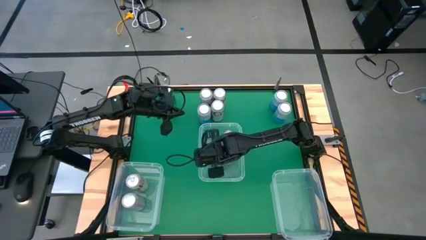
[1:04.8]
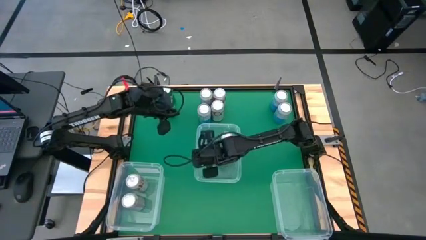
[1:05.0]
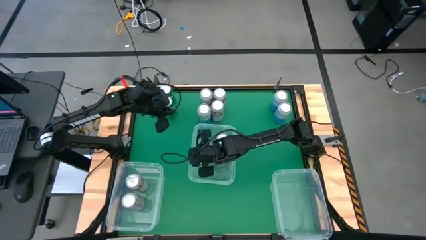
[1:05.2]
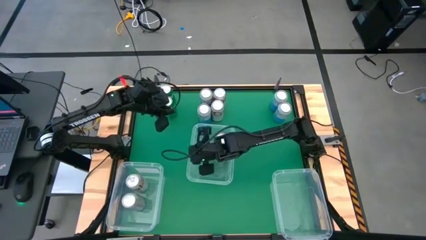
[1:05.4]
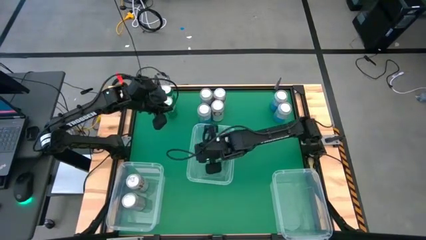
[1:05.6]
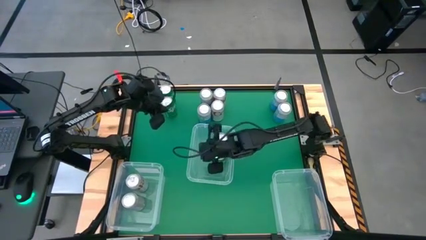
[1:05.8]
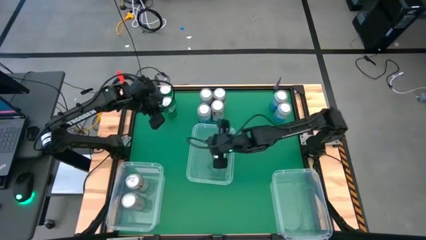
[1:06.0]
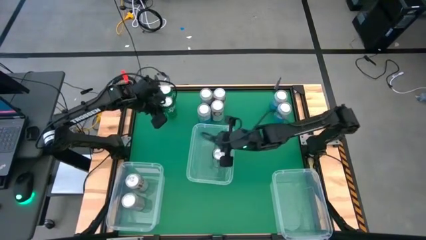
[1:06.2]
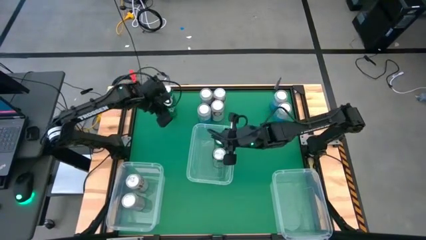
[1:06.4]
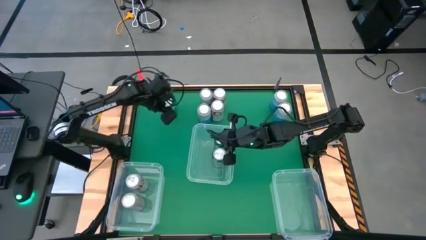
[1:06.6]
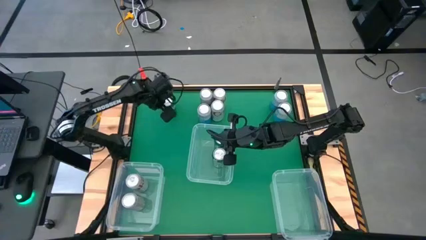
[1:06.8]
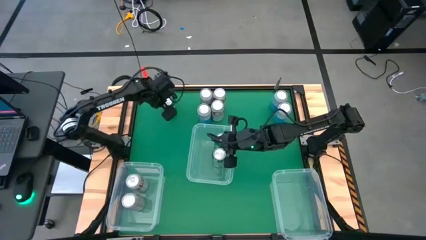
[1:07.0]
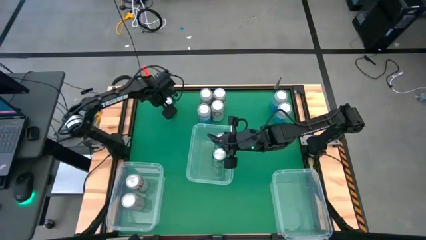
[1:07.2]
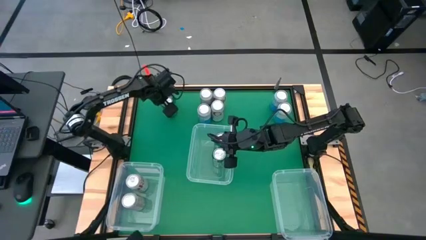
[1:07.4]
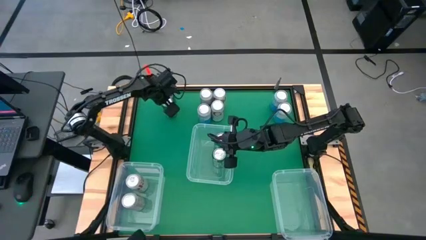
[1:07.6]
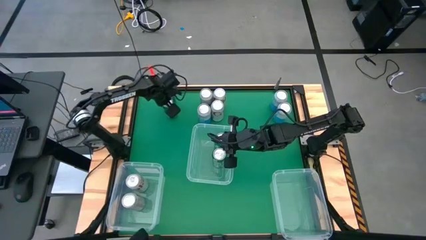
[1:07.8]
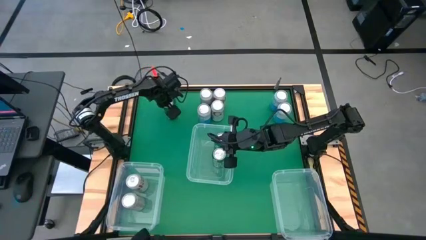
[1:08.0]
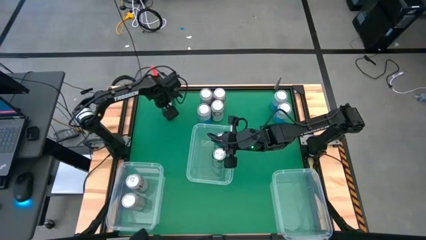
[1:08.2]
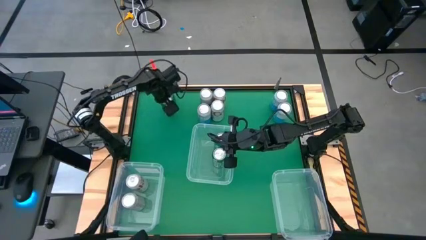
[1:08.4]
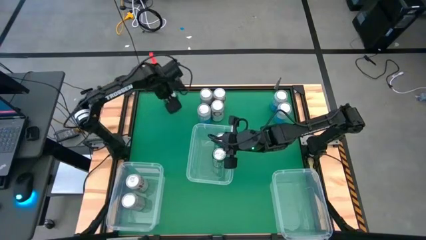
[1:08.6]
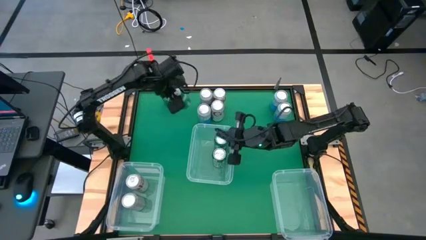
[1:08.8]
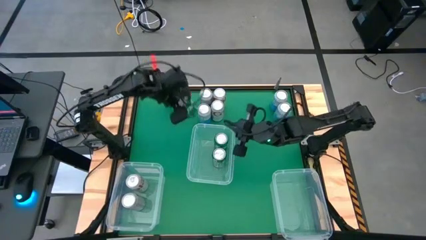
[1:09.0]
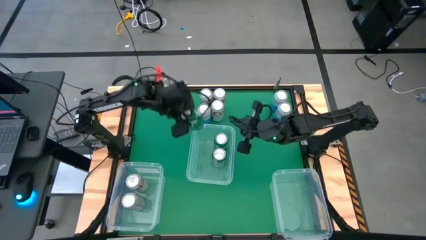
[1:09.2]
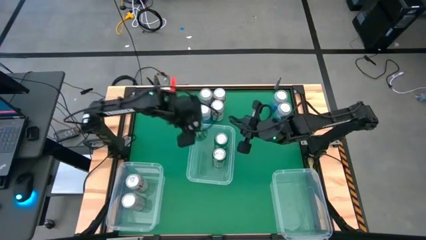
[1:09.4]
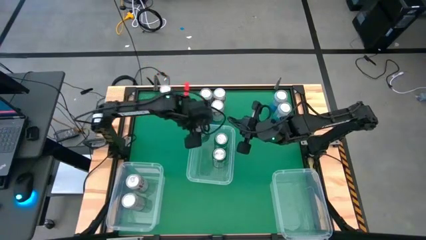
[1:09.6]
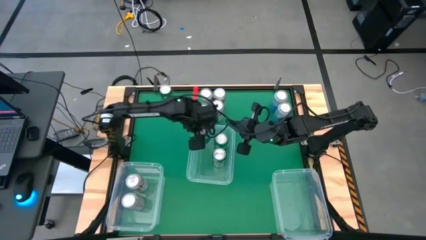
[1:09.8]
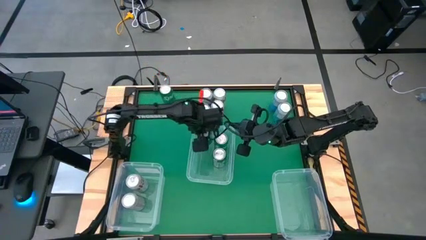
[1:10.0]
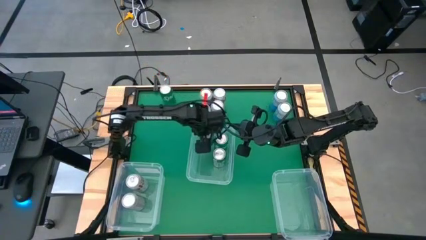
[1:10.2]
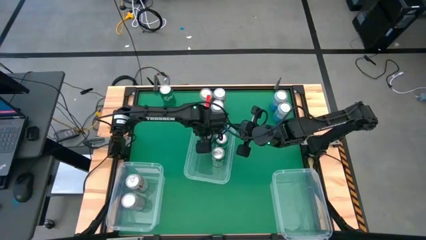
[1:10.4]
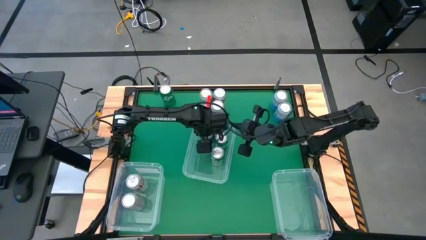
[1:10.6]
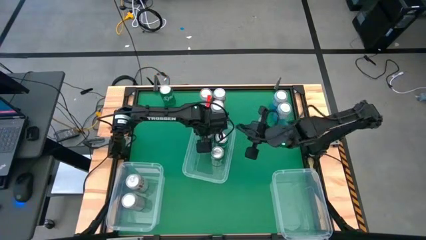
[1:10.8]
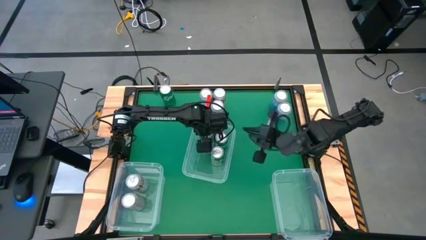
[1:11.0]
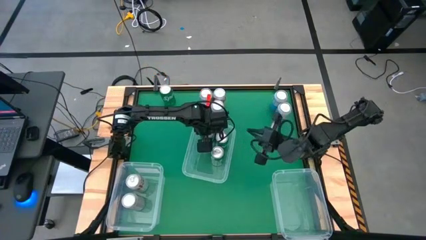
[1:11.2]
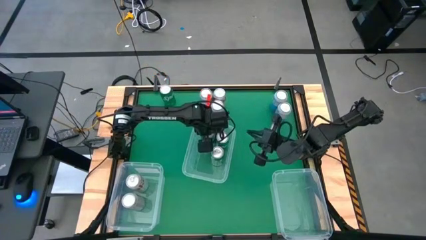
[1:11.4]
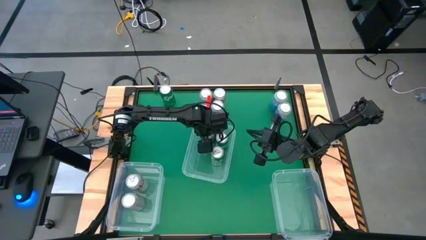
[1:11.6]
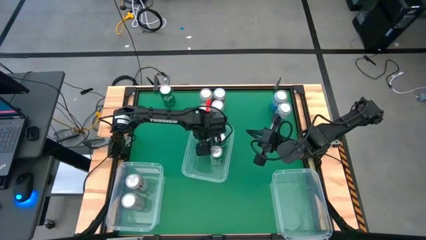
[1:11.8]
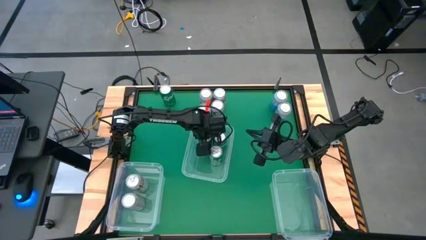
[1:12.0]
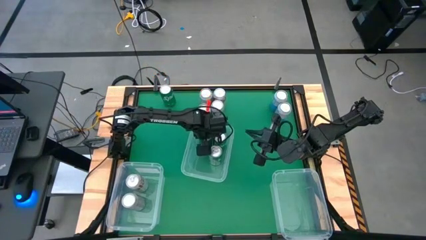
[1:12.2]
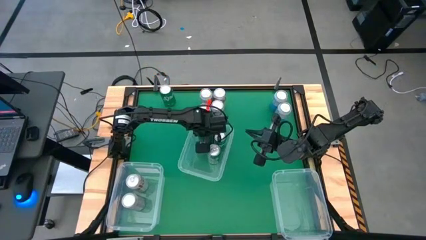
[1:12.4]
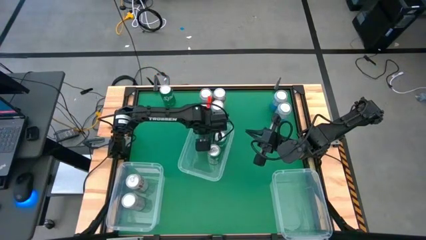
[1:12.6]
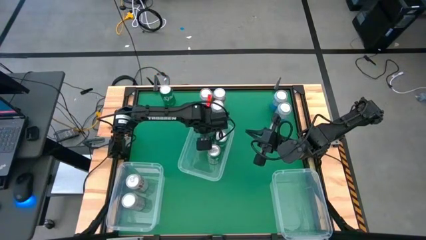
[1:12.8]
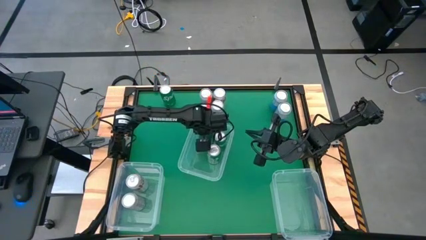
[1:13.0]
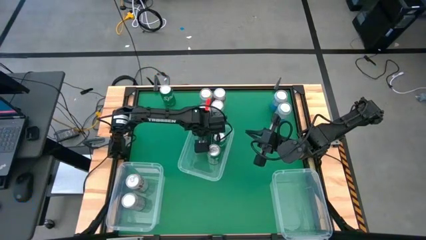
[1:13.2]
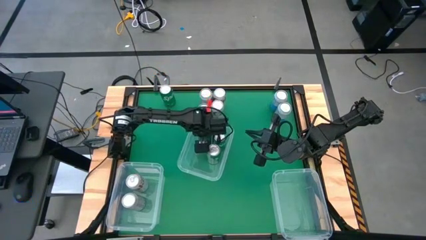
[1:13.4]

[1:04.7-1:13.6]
Task: Sort soda cans
Put the green soda can into the top transparent bin

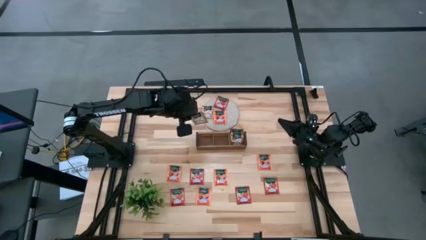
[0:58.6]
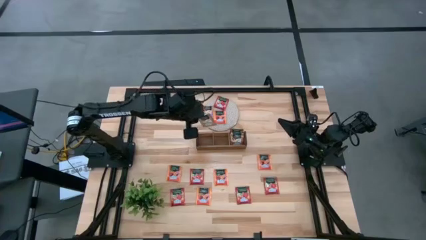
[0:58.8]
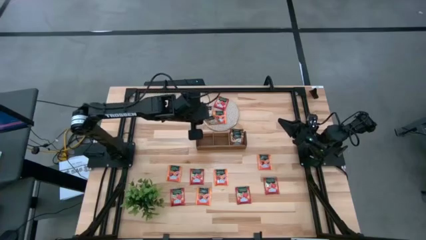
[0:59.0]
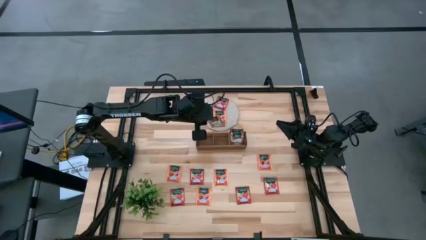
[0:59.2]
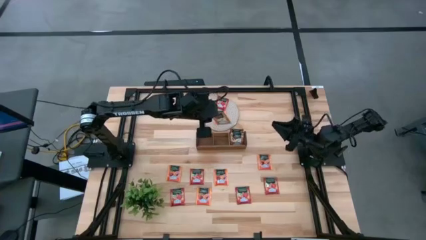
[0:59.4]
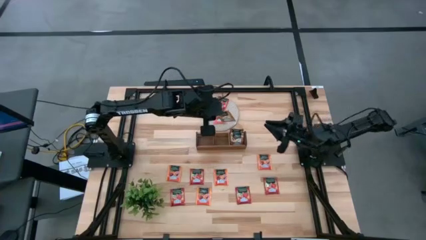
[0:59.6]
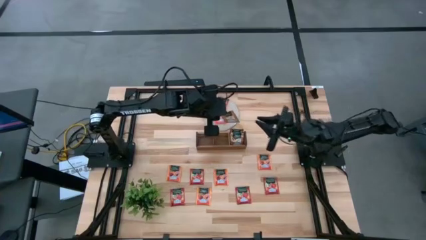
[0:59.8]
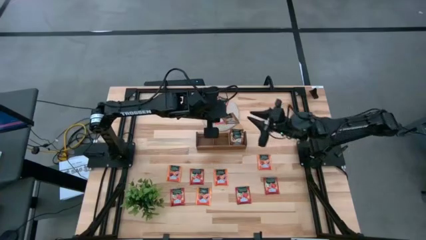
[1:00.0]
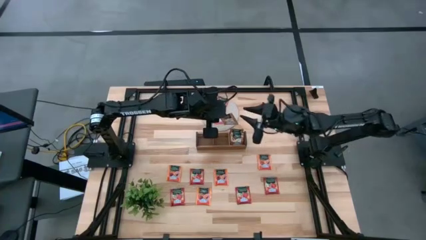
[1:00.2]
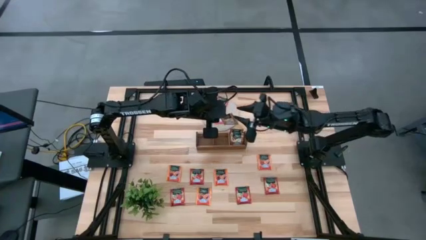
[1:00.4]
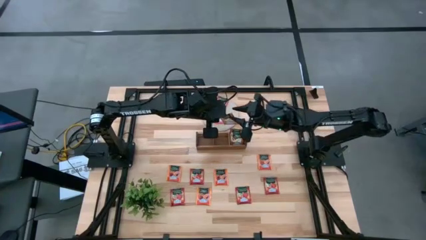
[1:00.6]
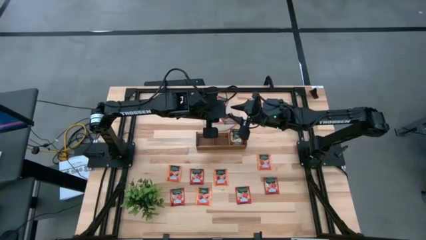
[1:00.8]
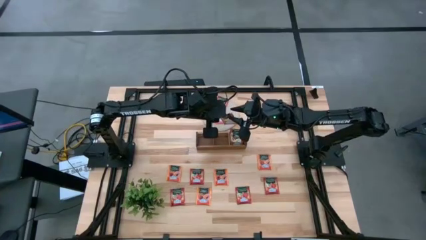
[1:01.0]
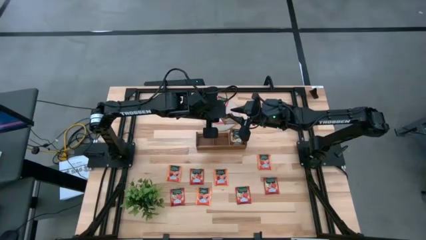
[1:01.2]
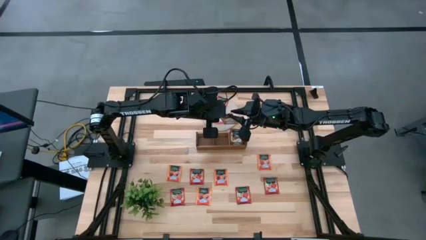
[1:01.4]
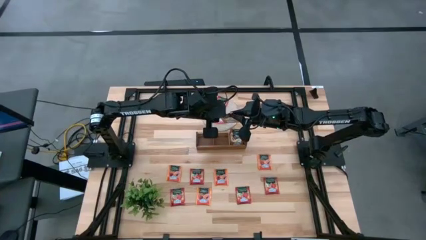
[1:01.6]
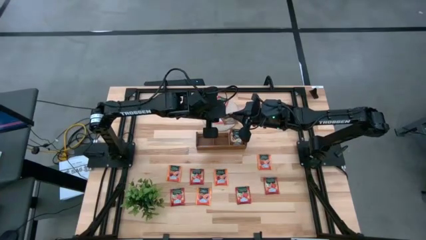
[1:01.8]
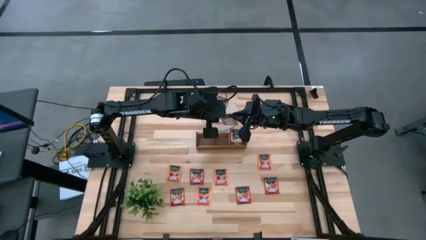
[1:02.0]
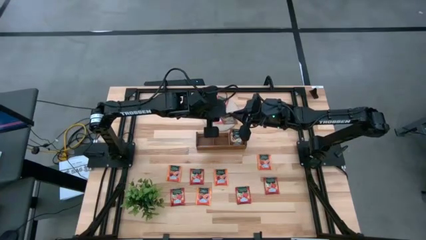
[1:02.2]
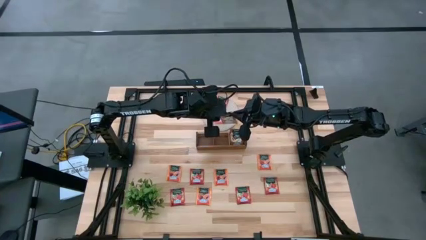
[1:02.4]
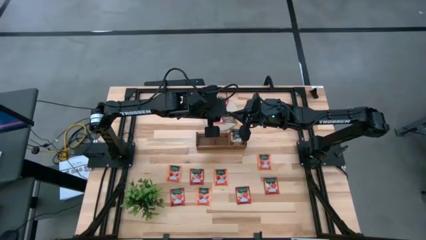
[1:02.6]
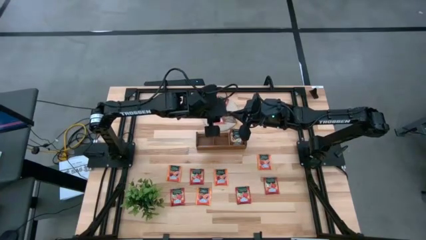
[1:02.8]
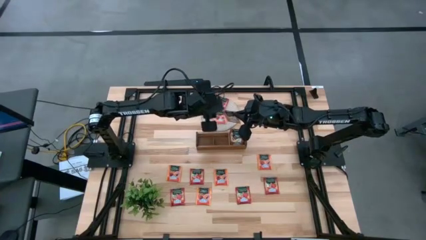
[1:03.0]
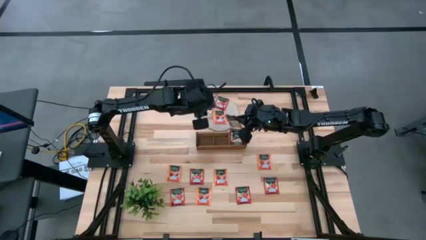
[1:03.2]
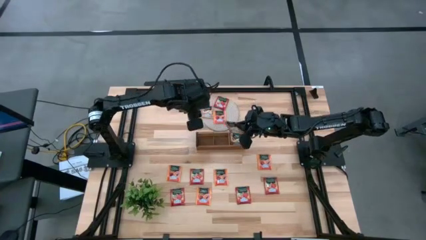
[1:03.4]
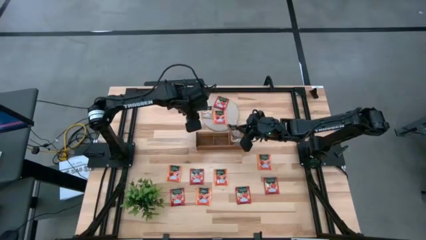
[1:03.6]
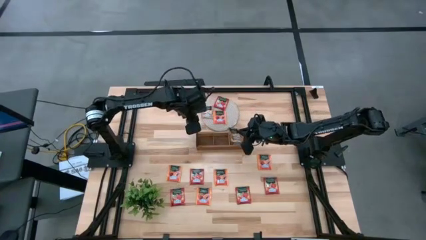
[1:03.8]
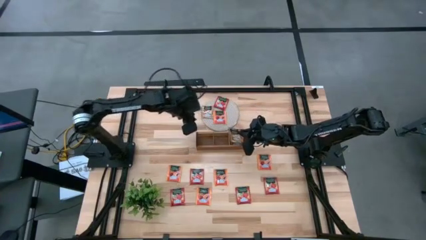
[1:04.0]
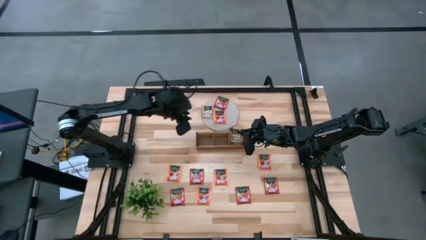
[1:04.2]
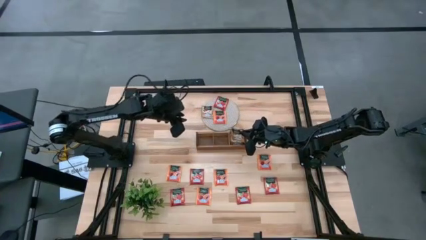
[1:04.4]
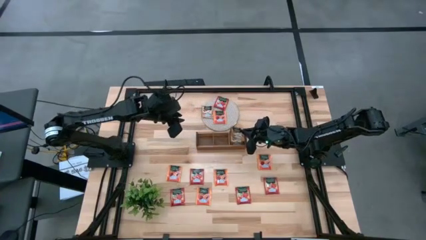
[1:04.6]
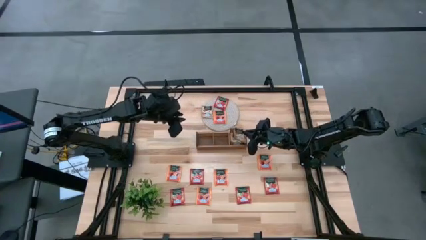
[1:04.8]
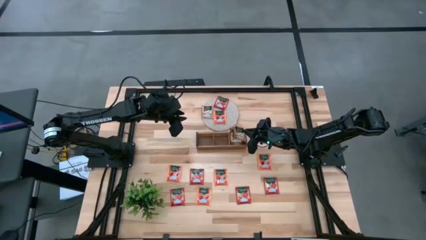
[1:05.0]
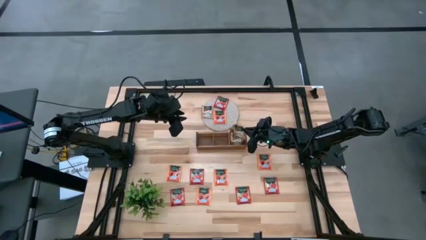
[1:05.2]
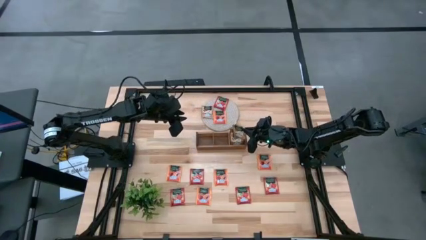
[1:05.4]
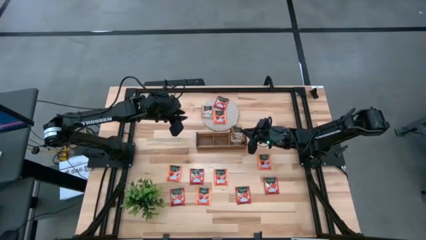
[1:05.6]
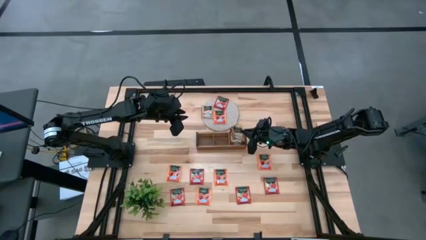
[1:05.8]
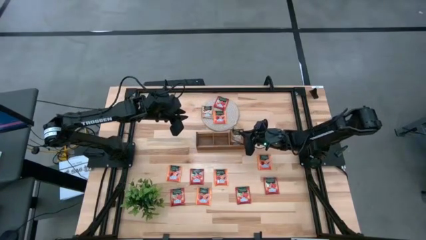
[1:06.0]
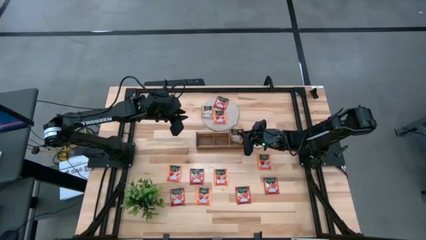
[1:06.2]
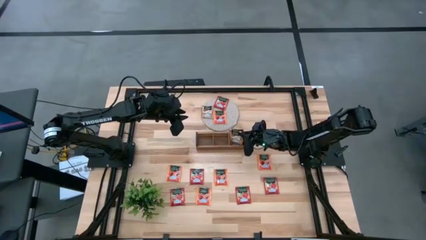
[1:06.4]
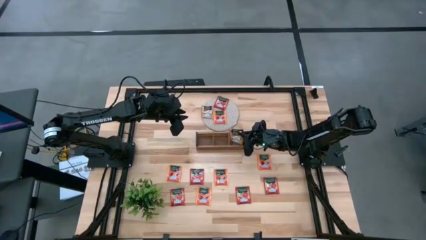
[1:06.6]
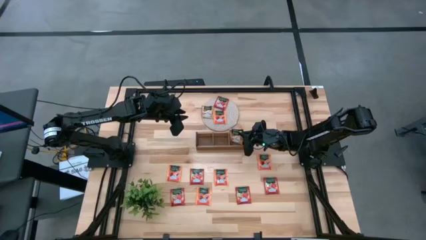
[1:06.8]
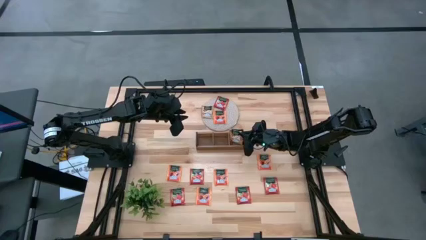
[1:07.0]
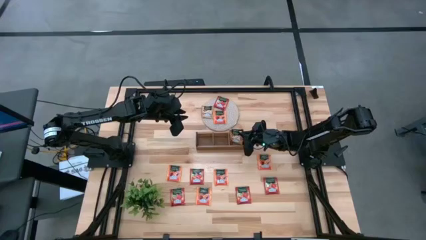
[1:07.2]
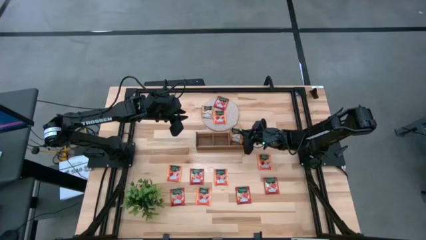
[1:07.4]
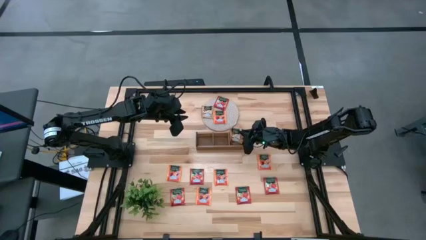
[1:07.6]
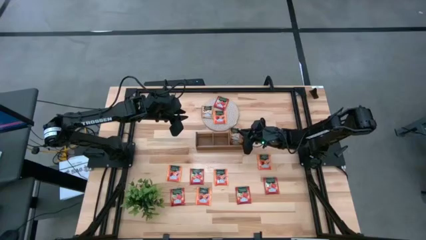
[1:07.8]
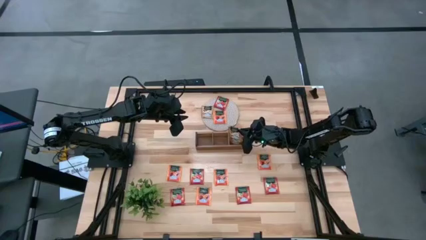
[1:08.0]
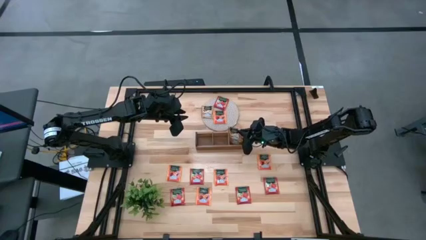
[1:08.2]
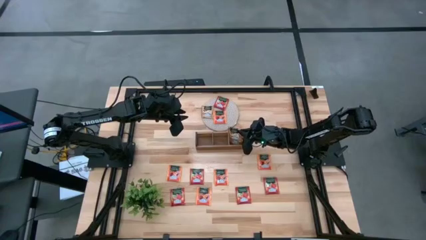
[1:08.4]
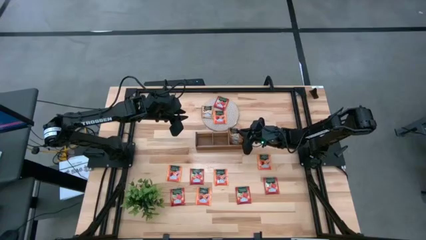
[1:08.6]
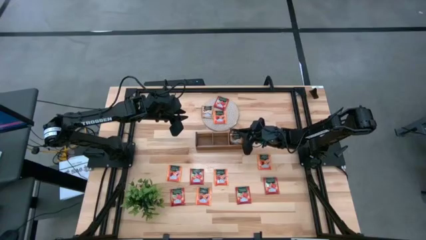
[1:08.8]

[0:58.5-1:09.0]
Task: Pick & Place Tea
Put the brown tea bag into the right section of the wooden organizer
